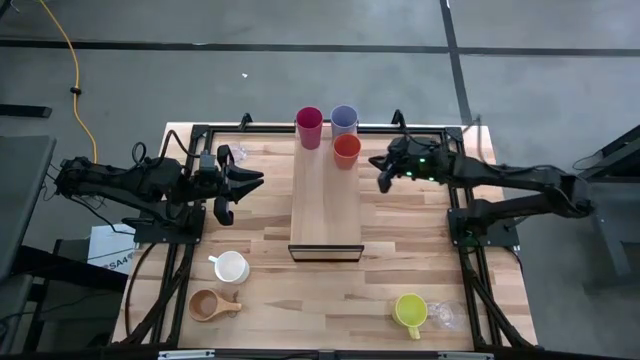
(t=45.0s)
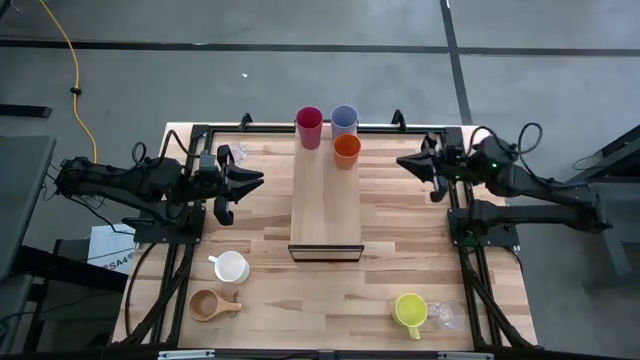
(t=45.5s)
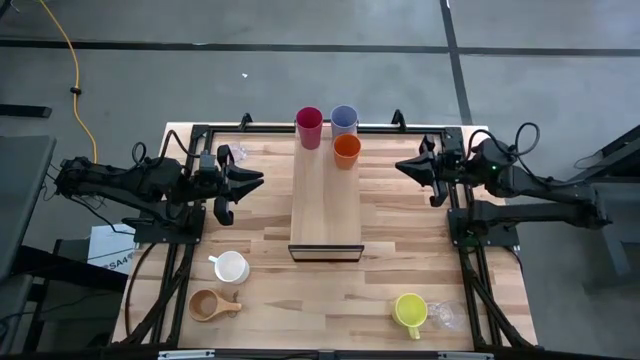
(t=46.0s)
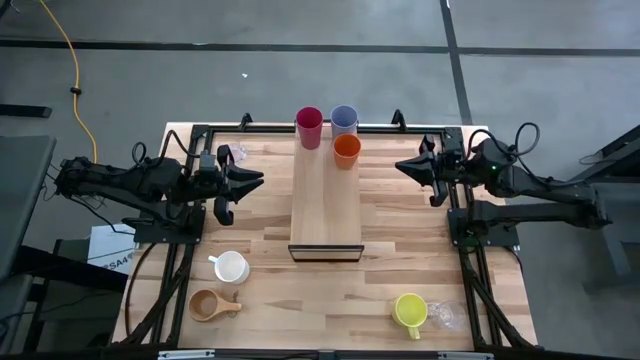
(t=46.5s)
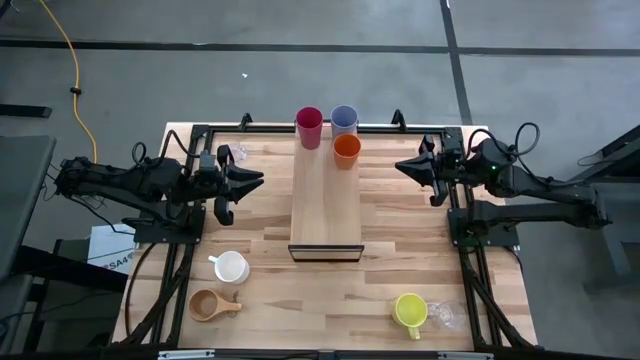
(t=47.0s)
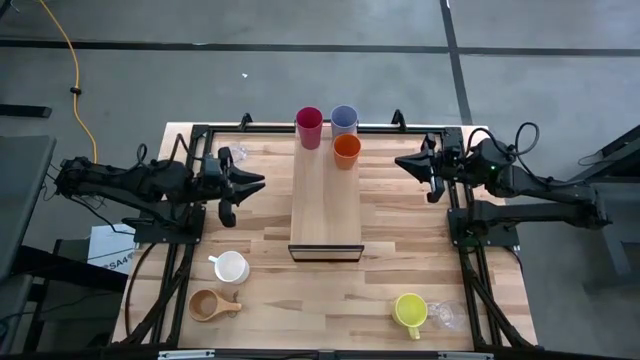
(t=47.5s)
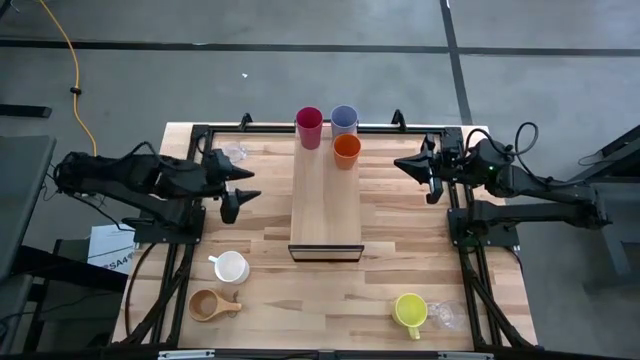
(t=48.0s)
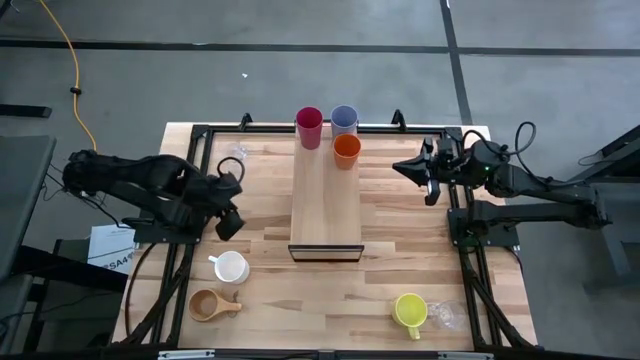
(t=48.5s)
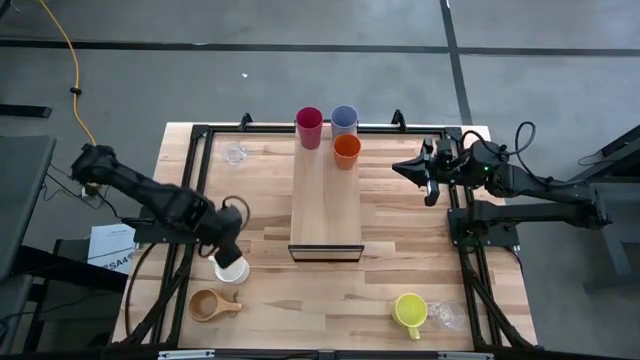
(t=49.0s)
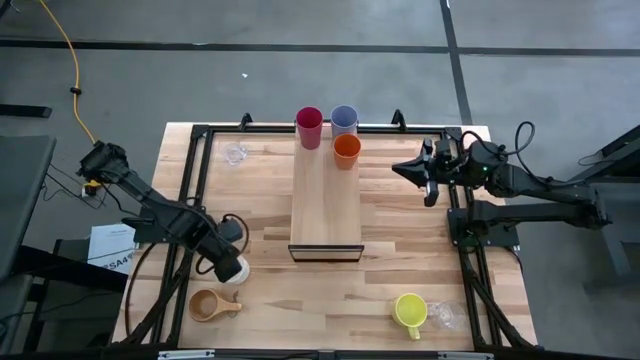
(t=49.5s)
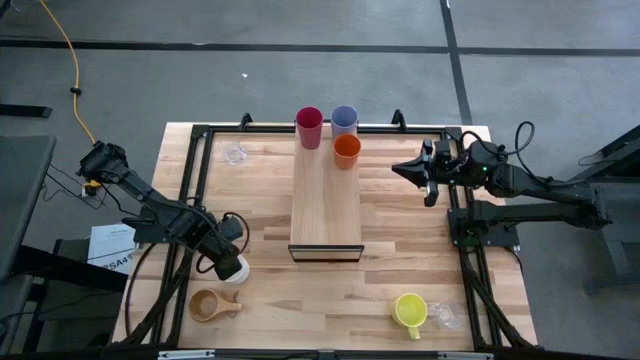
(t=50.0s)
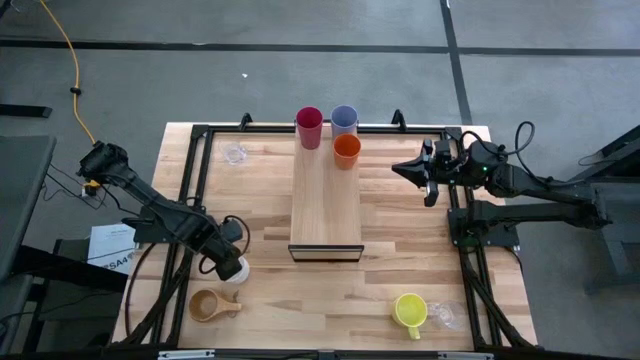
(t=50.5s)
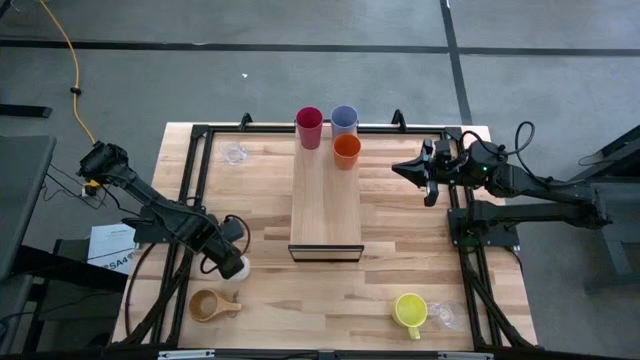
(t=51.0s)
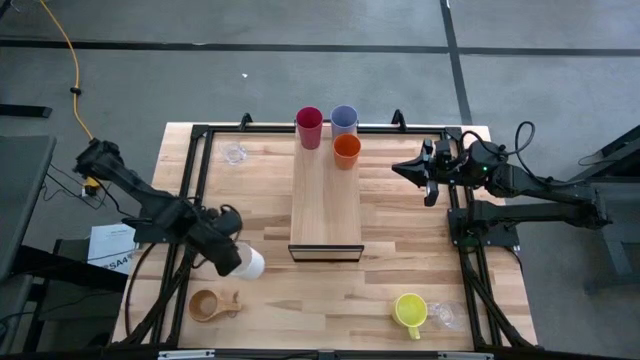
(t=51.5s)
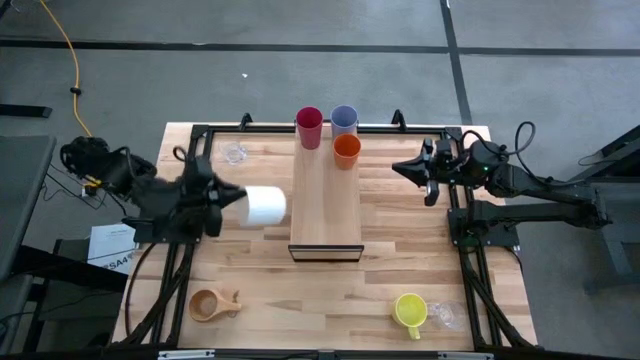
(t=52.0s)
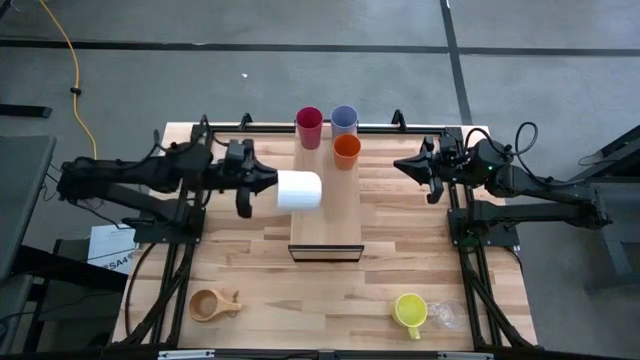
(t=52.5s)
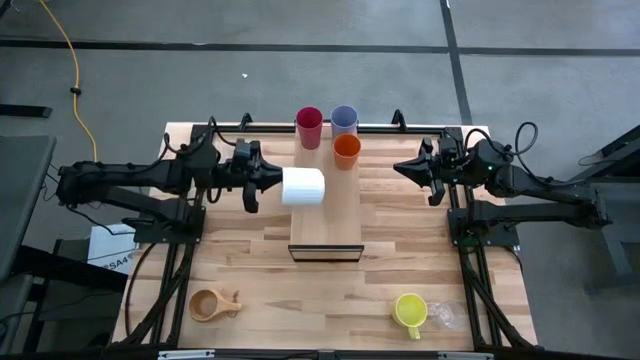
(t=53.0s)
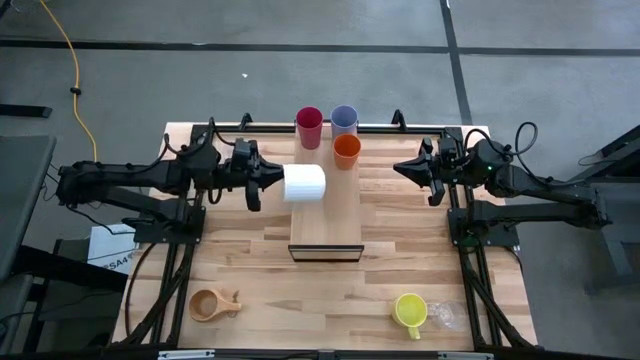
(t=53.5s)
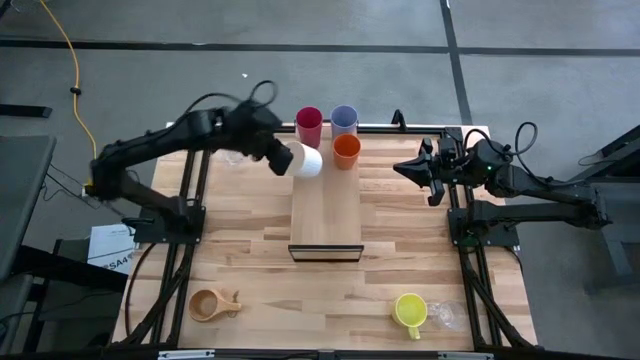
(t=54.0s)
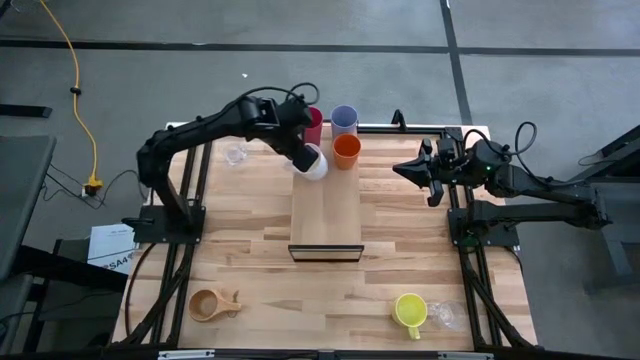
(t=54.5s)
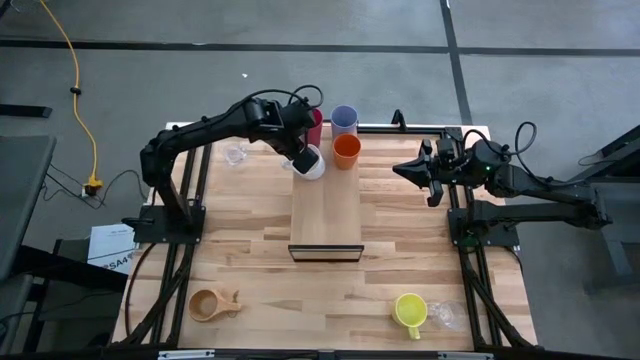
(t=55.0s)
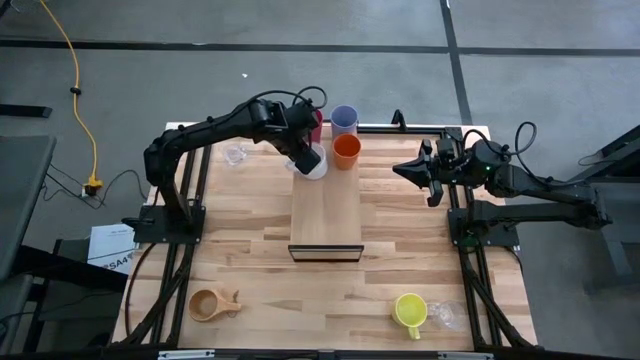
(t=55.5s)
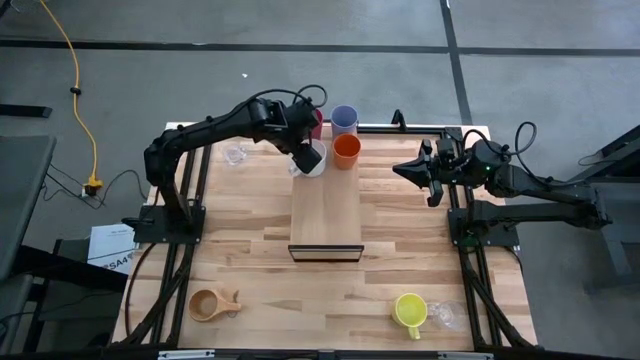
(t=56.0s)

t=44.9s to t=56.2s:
Task: Stack small to large cups/mugs on shelf
Put the white mug on the shelf

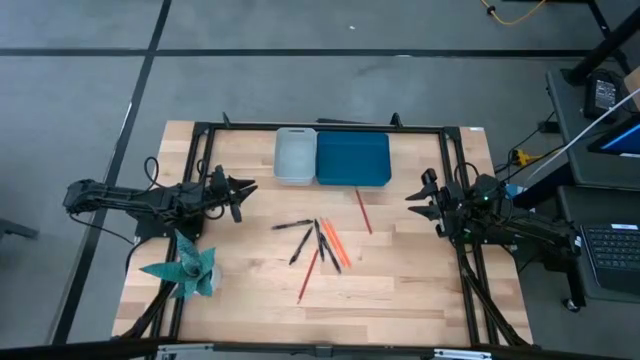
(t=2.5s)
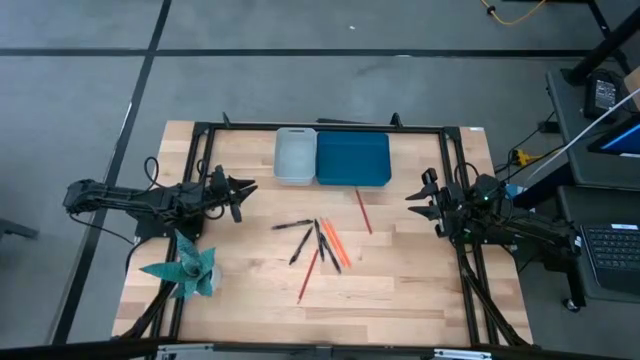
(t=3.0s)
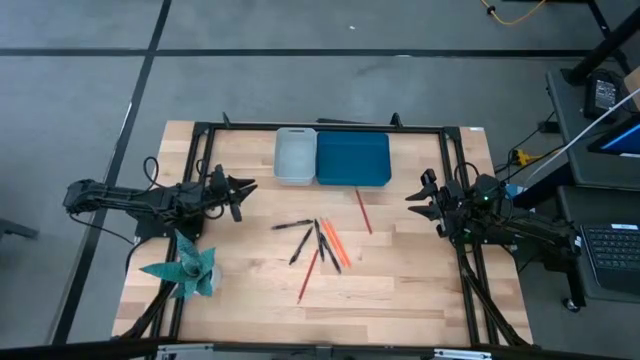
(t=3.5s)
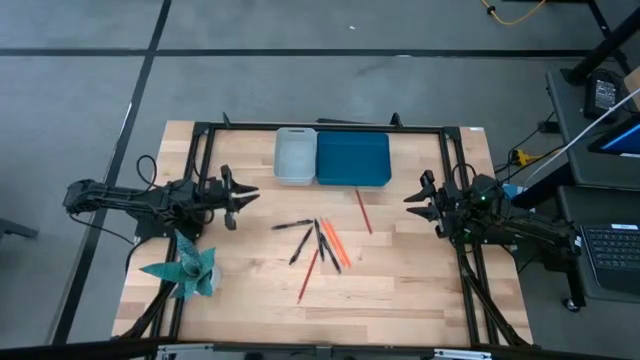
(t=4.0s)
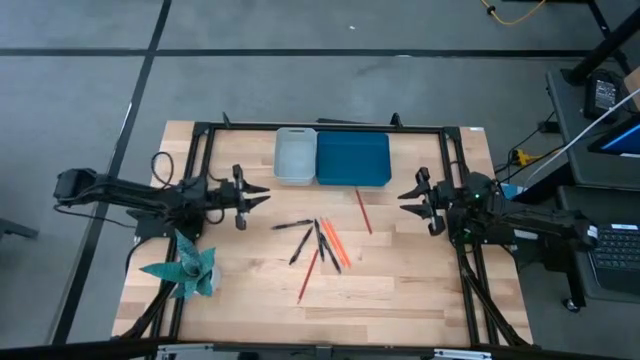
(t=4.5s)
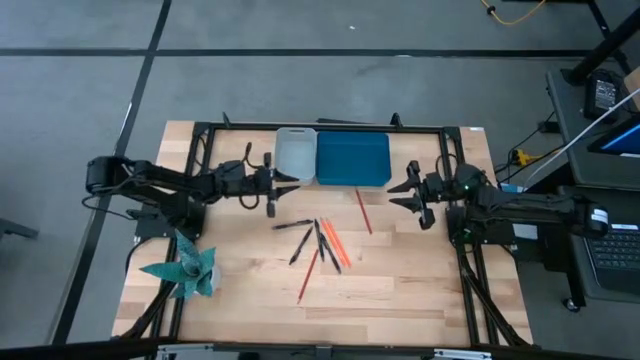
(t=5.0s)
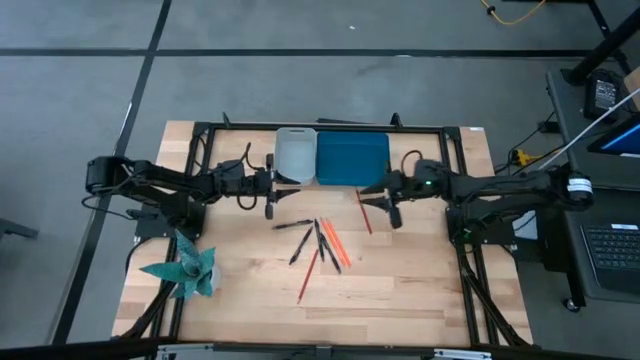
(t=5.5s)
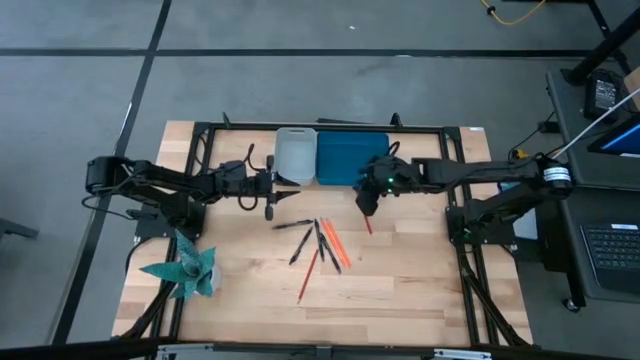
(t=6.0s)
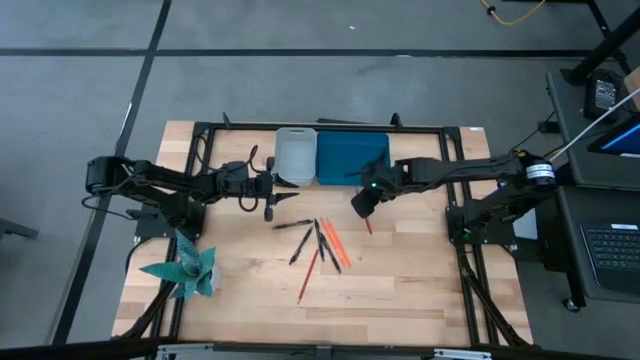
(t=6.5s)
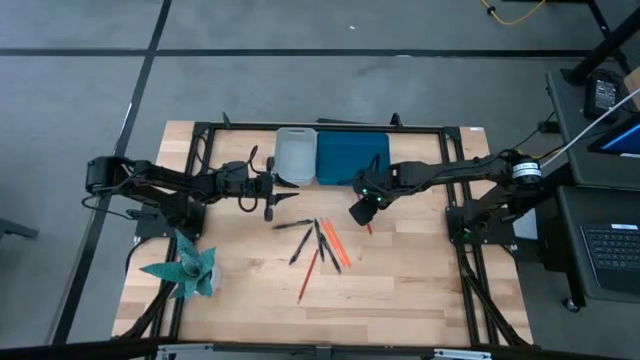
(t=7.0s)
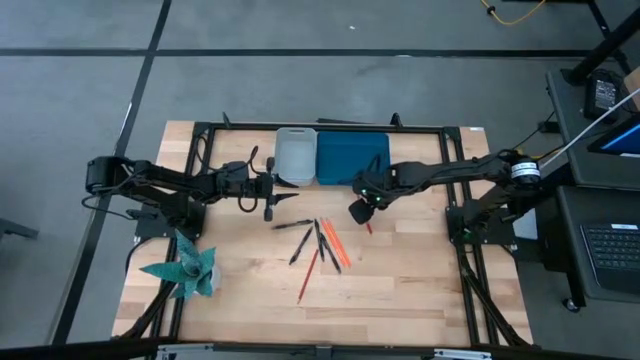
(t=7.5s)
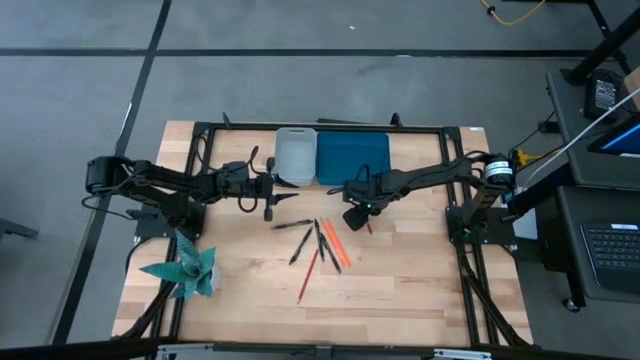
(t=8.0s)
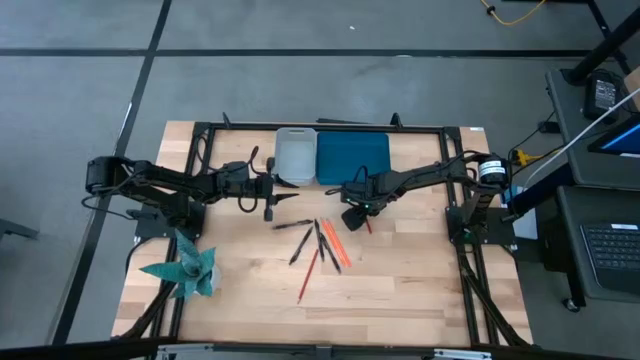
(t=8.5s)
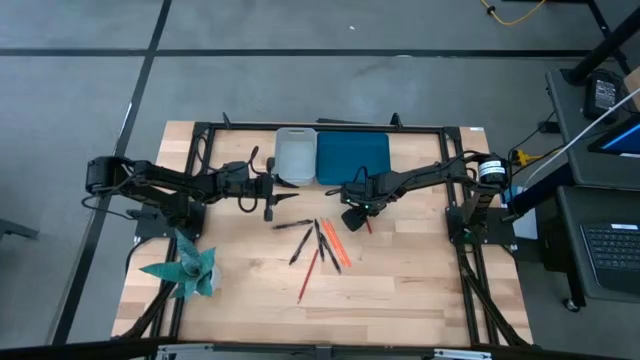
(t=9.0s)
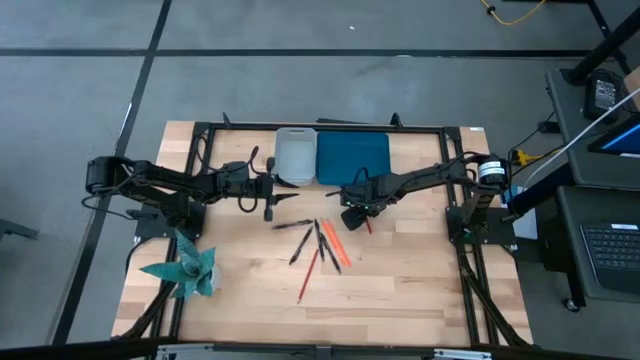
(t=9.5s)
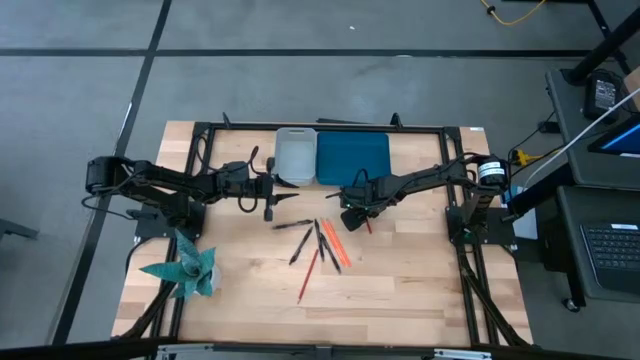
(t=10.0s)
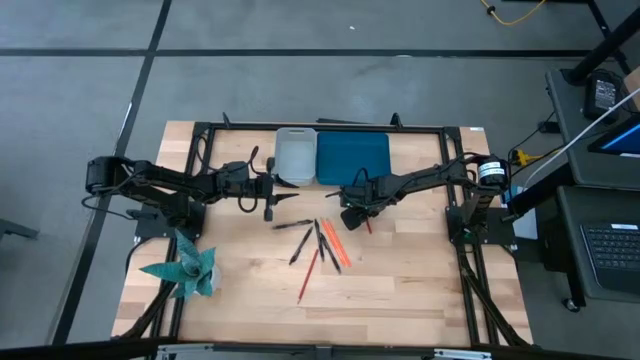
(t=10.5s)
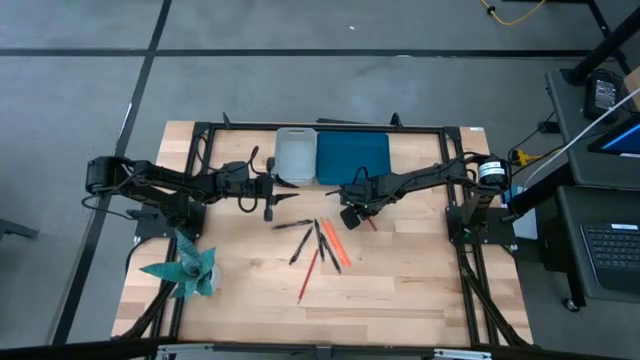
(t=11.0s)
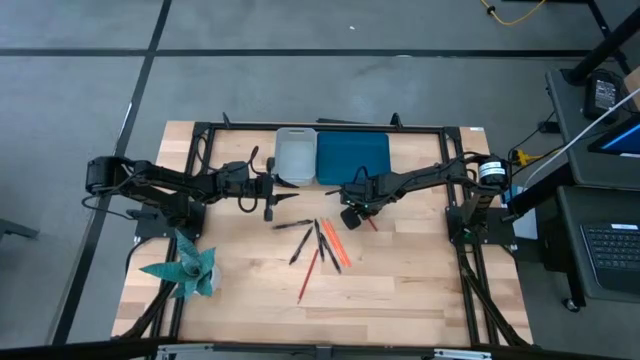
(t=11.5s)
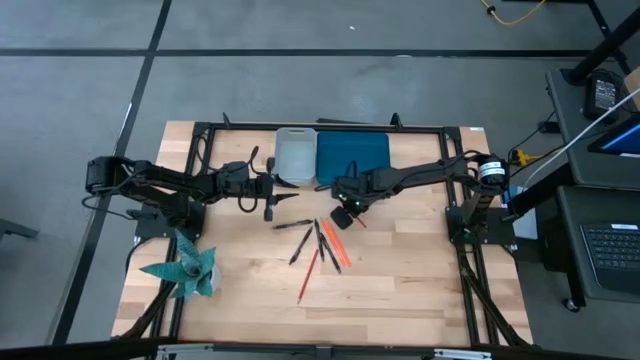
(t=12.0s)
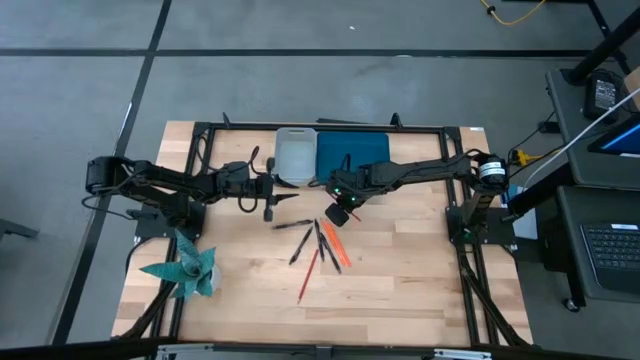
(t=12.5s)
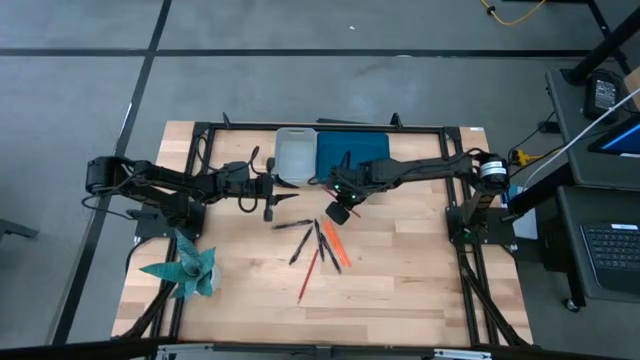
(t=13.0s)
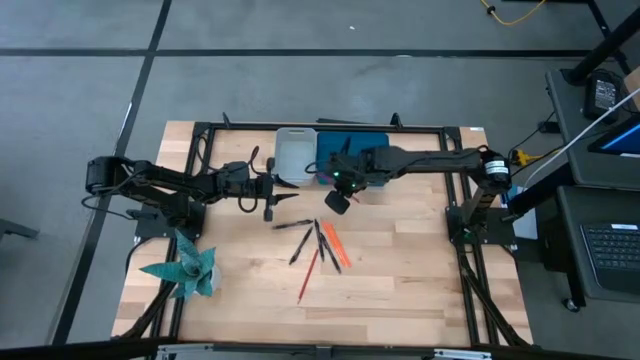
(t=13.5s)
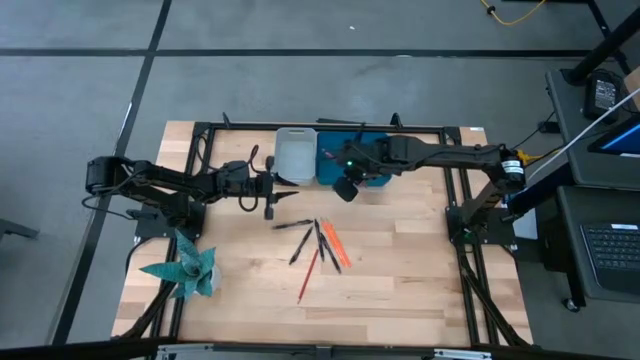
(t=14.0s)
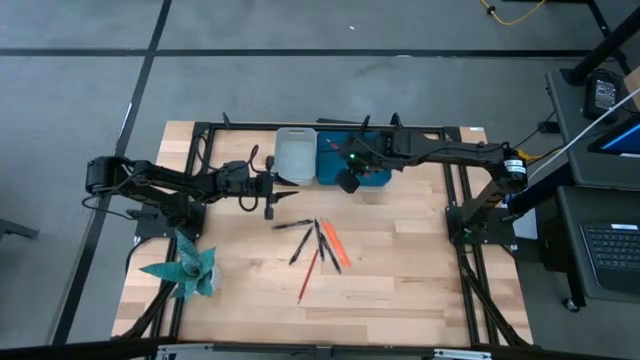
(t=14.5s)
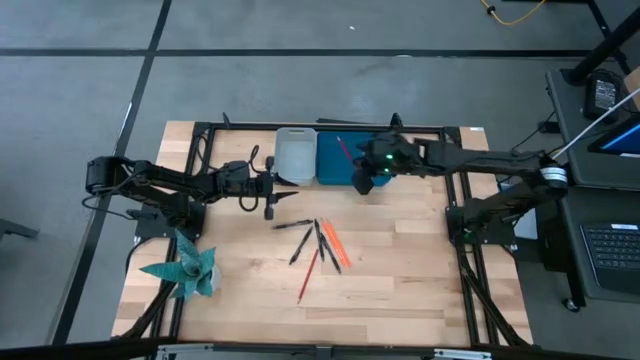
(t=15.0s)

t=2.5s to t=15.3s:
Task: Sort pens & pencils
Put the top red pencil into the blue bin
